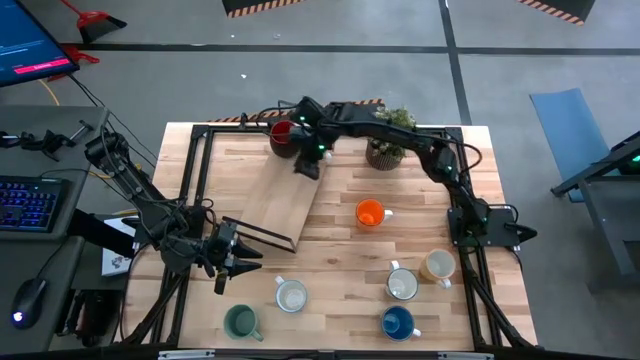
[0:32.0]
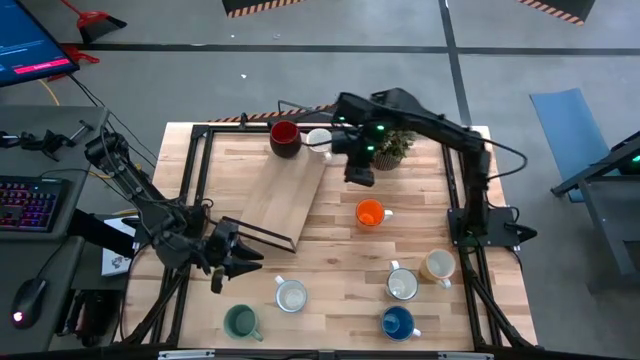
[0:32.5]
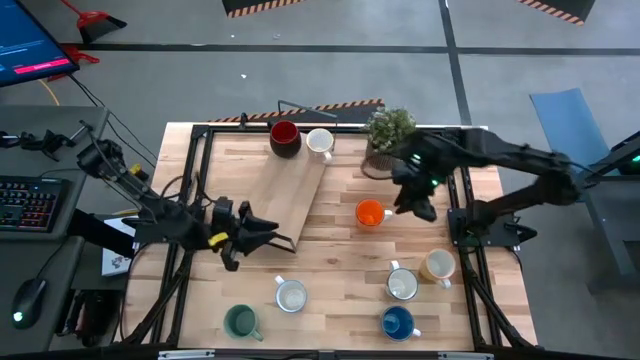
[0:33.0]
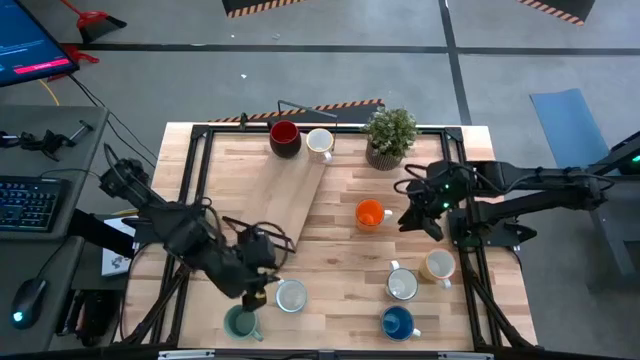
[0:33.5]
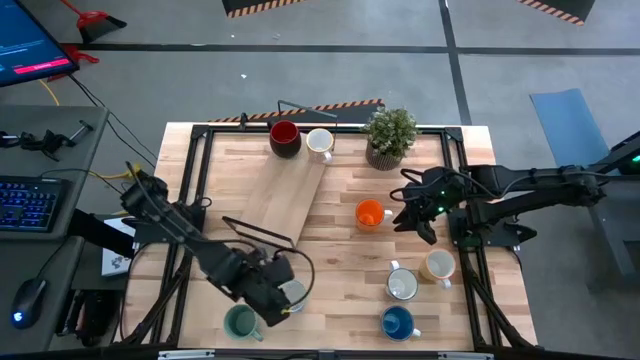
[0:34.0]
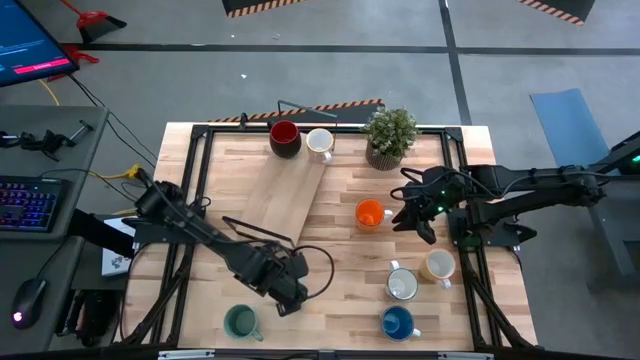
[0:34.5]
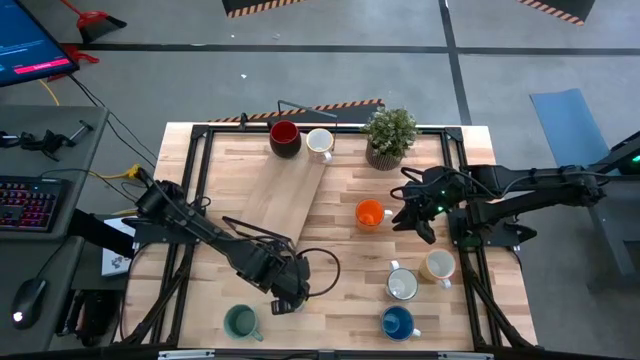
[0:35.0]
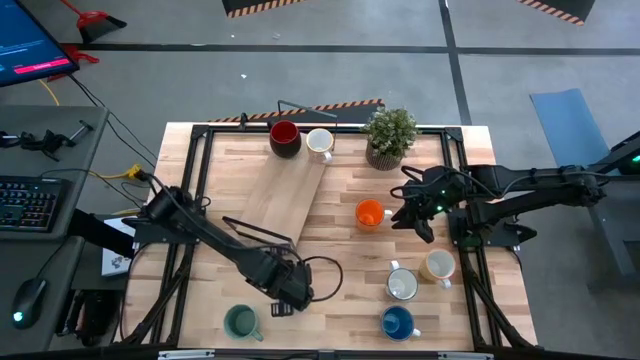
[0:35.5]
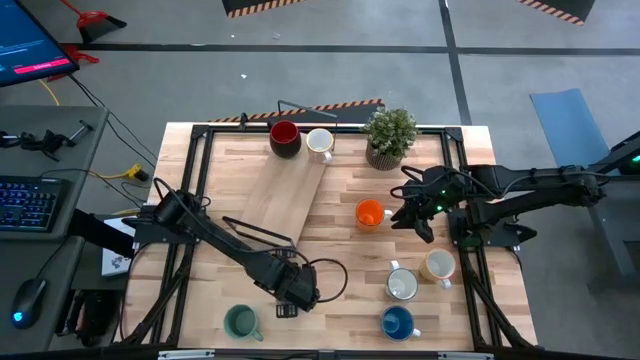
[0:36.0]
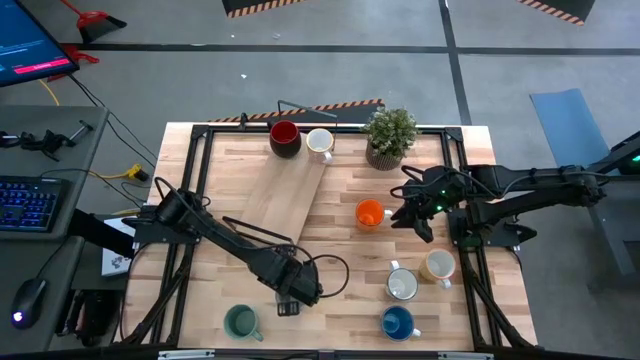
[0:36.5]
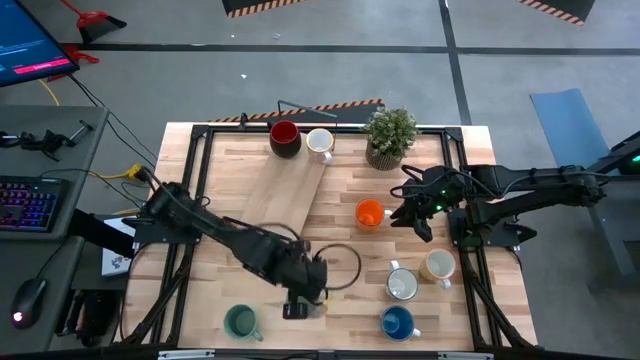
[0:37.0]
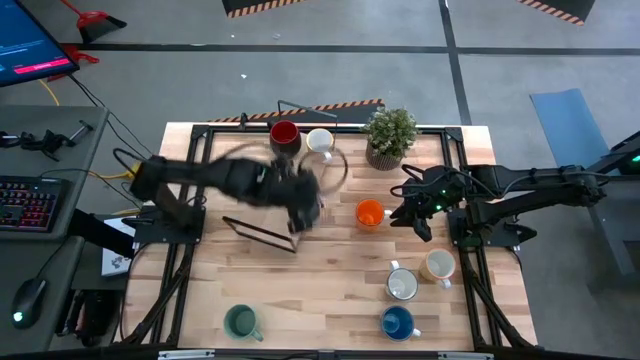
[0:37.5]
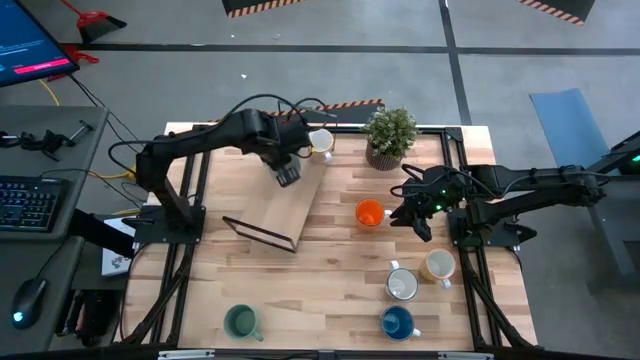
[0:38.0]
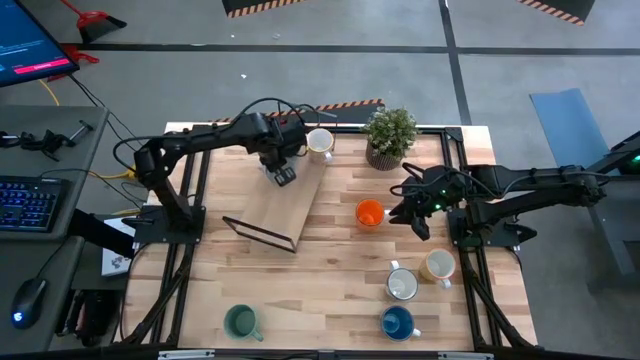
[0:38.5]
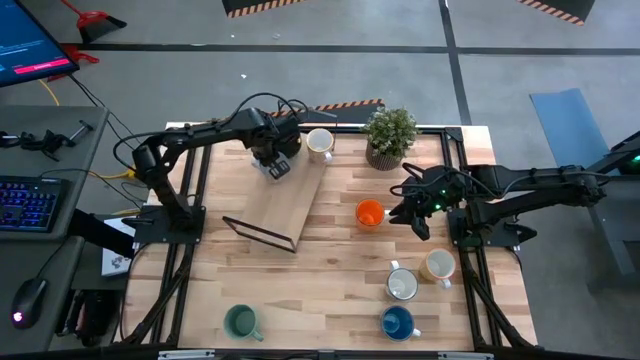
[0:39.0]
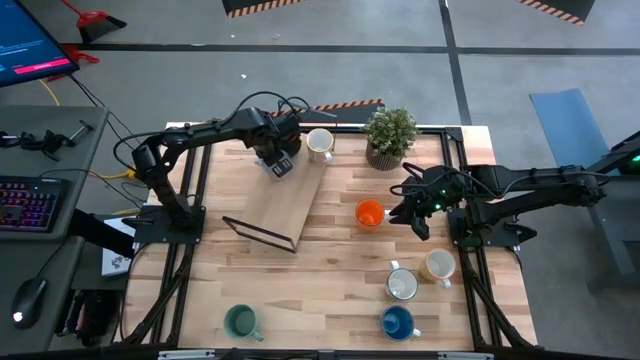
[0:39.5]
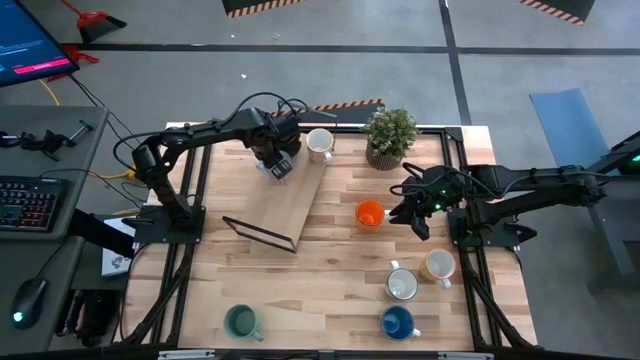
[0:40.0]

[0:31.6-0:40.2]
Task: Place coffee mugs
Put the red cup on the shelf

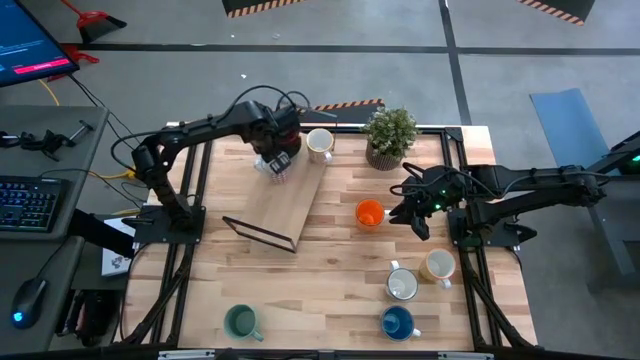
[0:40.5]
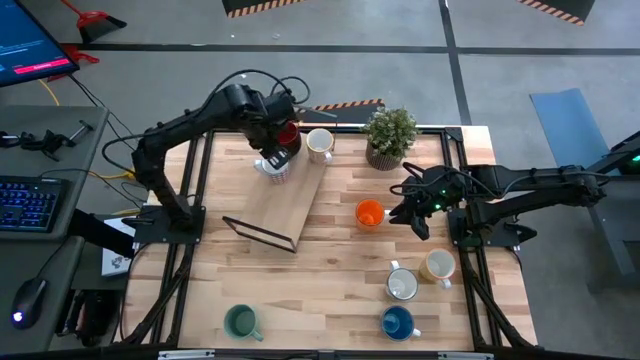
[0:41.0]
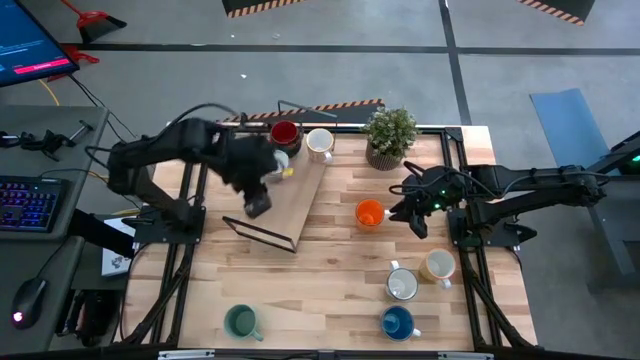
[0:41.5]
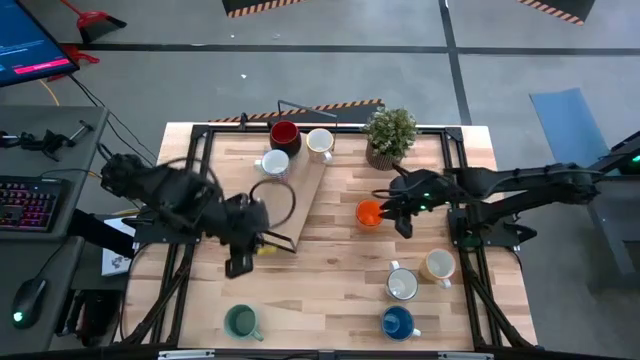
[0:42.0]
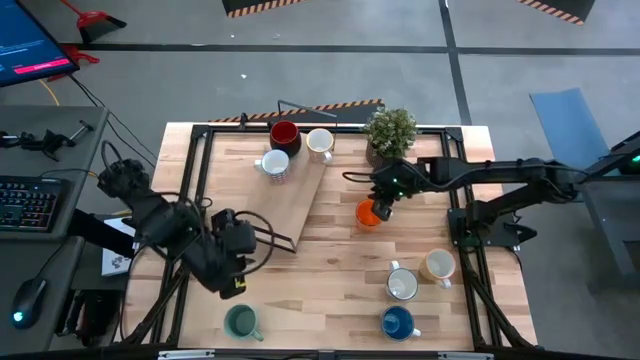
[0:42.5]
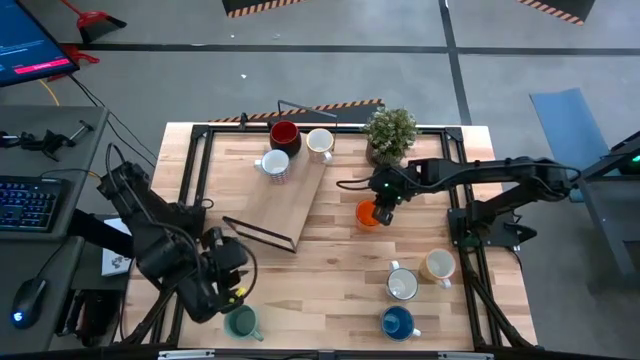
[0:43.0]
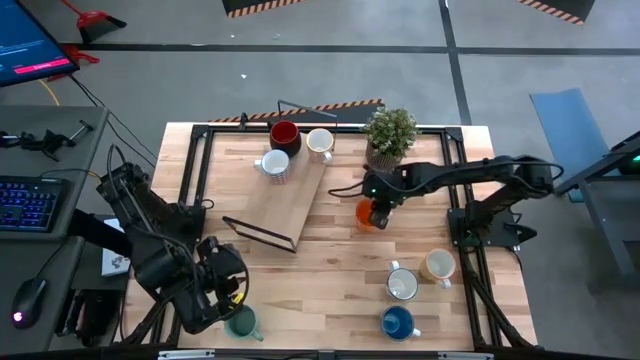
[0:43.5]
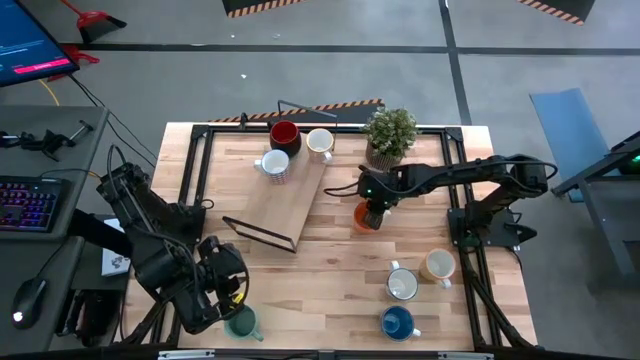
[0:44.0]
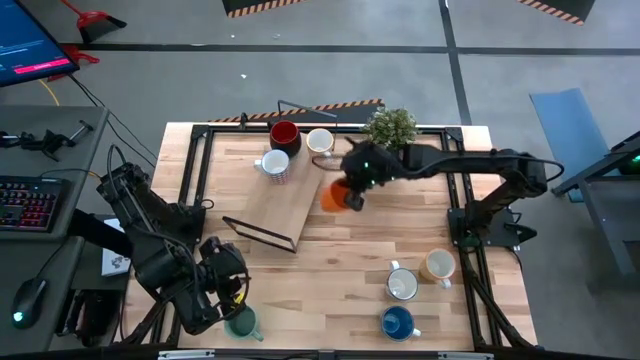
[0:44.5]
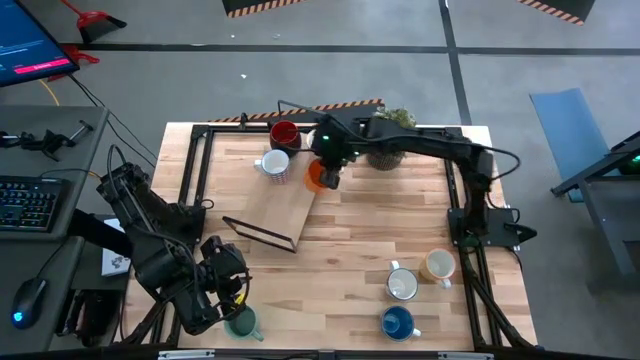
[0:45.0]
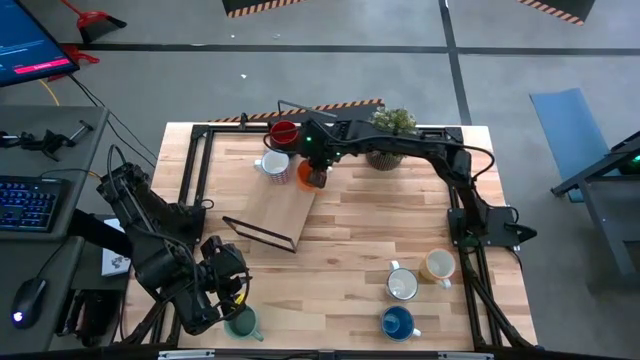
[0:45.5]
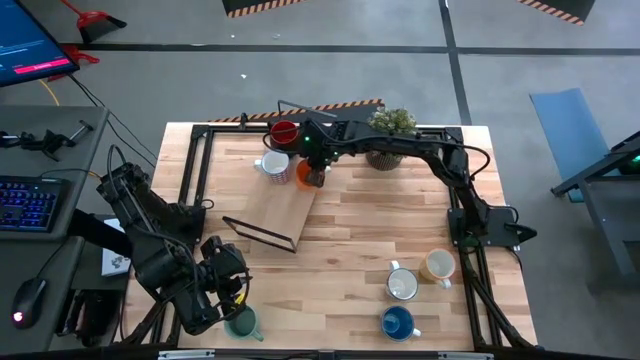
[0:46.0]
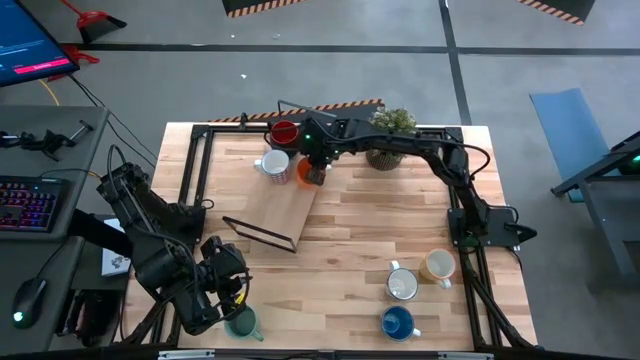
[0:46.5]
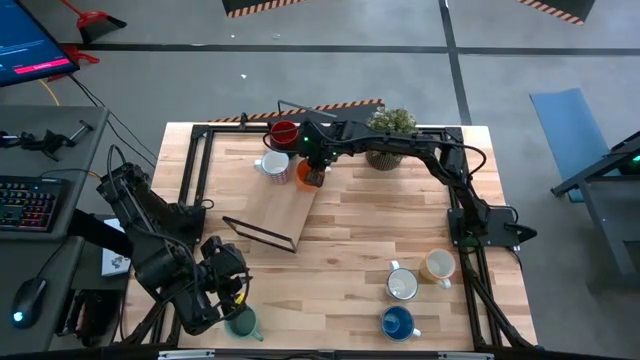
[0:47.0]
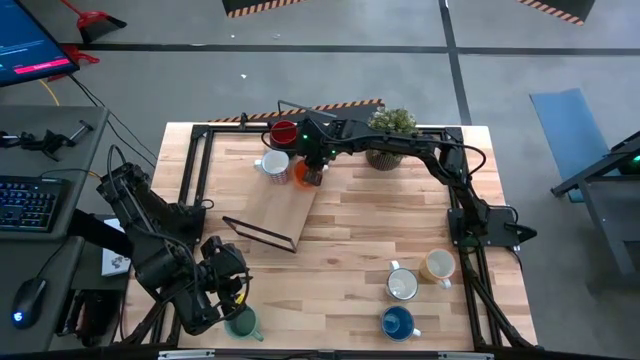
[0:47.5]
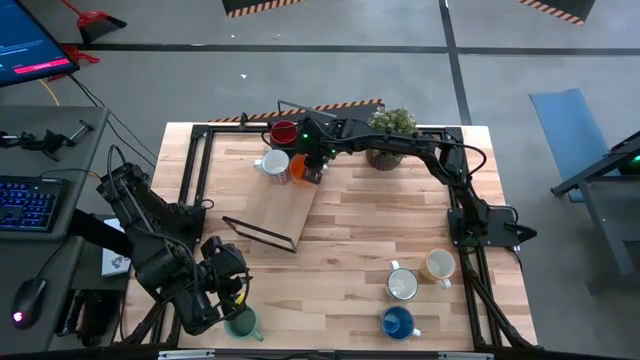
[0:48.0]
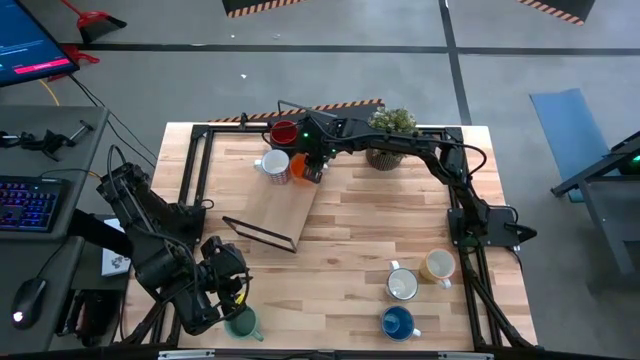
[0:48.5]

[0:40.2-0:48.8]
Put the orange cup on the shelf

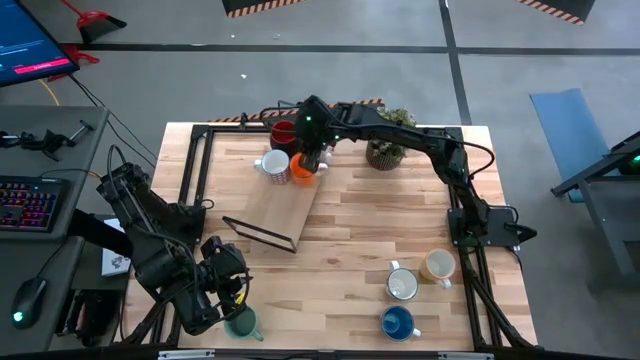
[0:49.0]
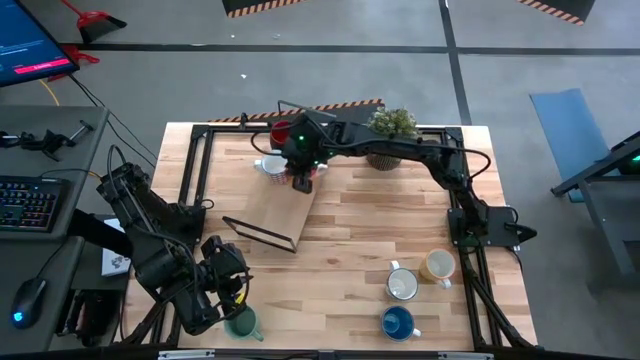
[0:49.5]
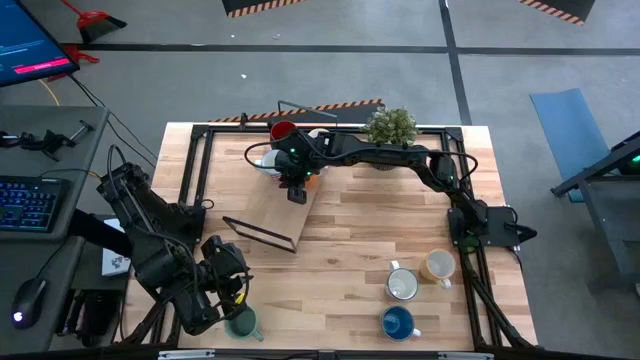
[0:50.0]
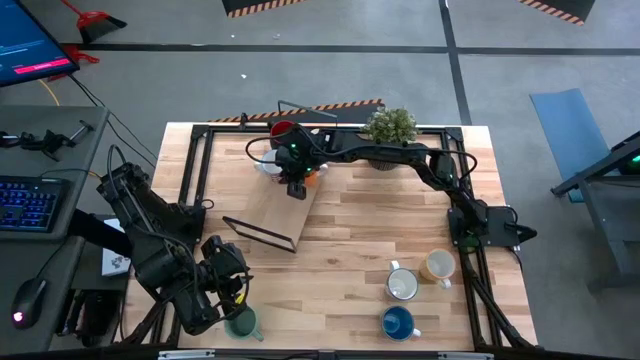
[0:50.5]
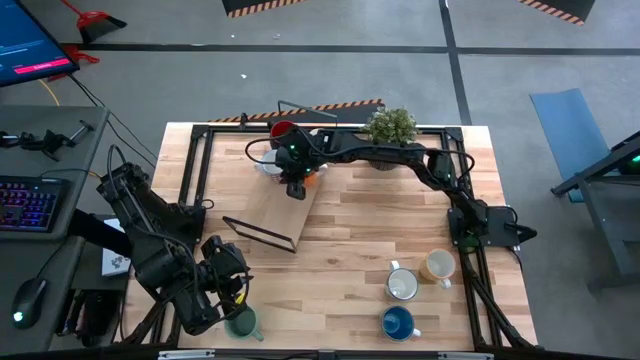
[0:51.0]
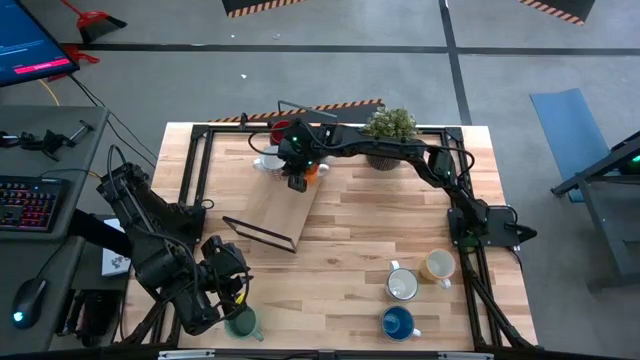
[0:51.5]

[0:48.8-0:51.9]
Adjust the red cup
